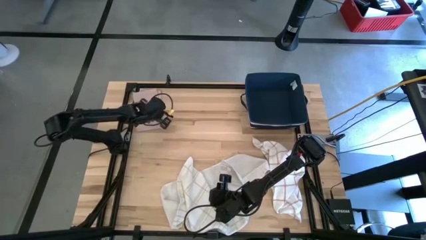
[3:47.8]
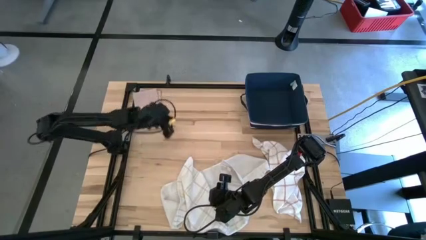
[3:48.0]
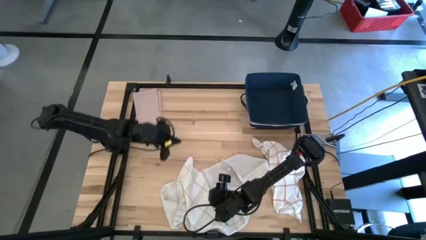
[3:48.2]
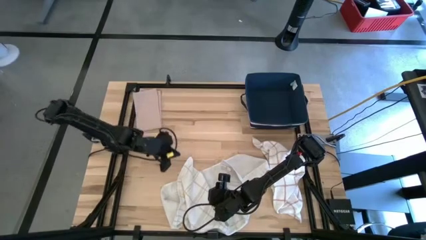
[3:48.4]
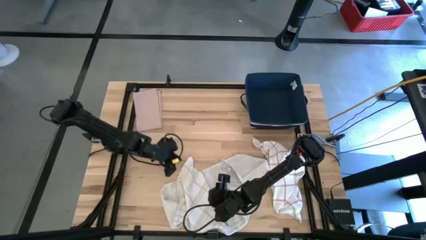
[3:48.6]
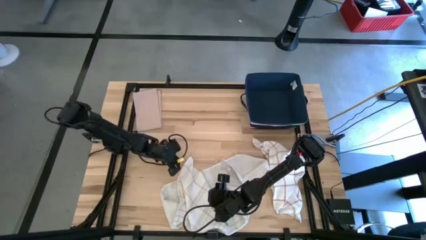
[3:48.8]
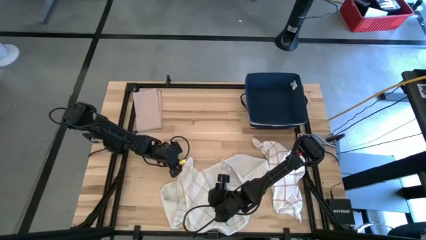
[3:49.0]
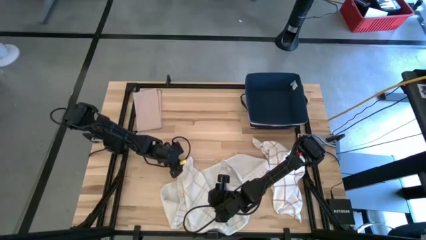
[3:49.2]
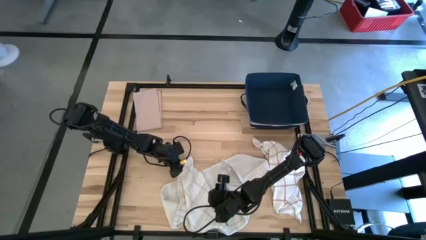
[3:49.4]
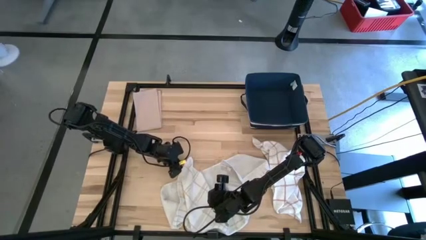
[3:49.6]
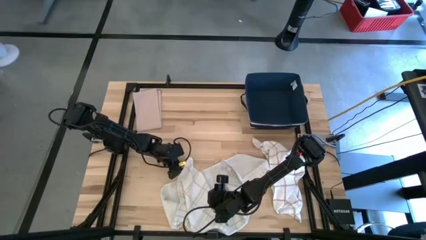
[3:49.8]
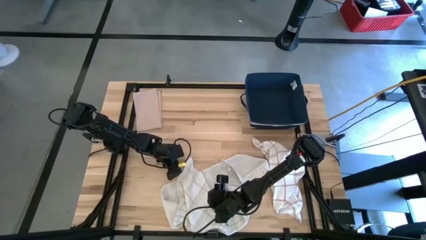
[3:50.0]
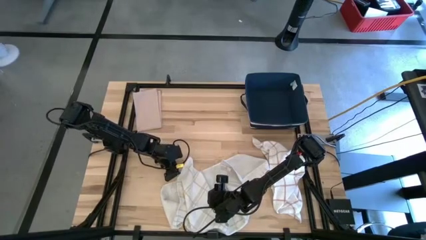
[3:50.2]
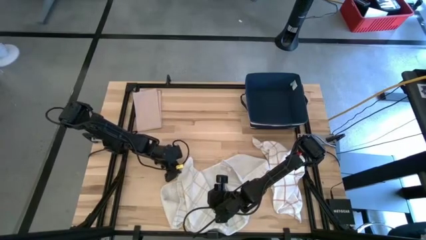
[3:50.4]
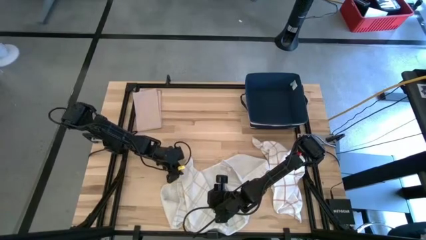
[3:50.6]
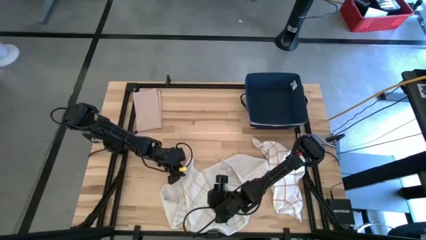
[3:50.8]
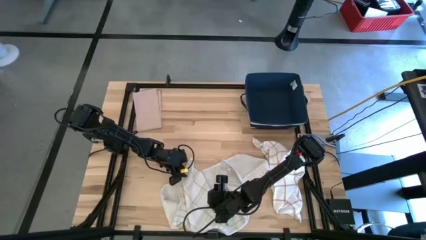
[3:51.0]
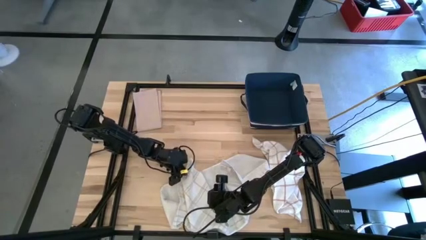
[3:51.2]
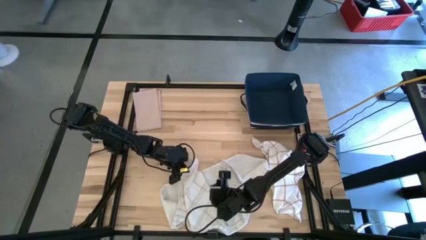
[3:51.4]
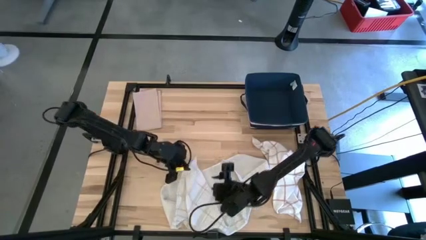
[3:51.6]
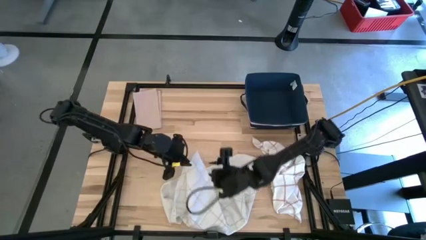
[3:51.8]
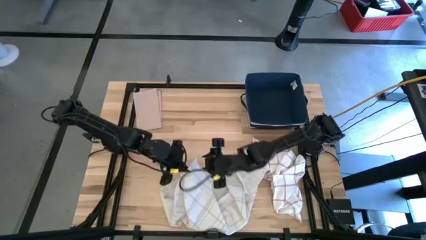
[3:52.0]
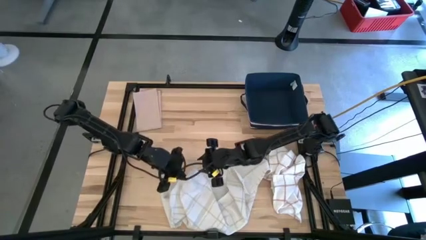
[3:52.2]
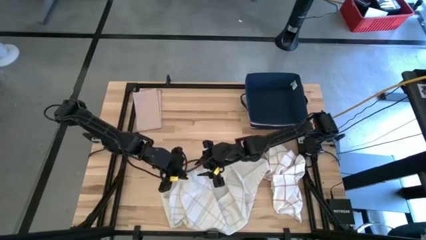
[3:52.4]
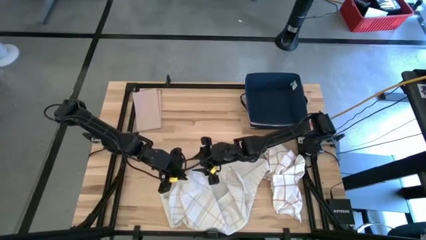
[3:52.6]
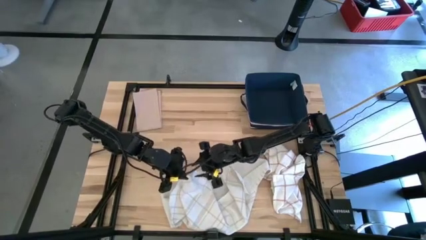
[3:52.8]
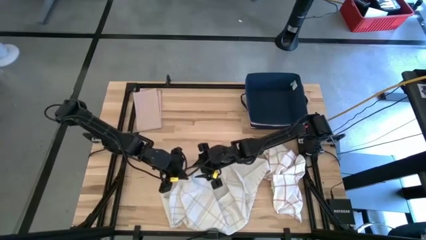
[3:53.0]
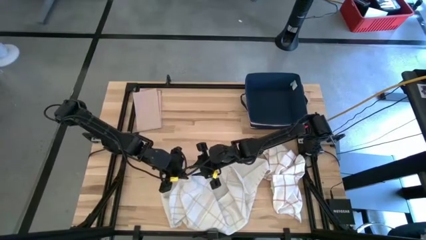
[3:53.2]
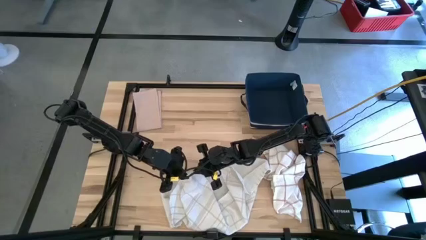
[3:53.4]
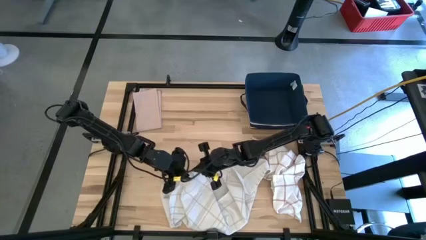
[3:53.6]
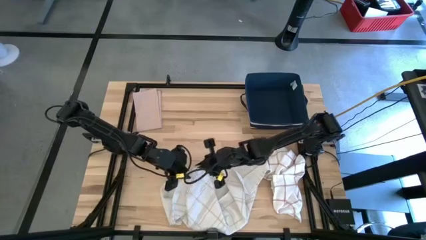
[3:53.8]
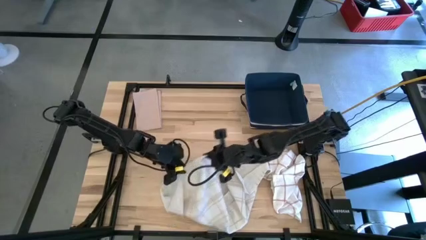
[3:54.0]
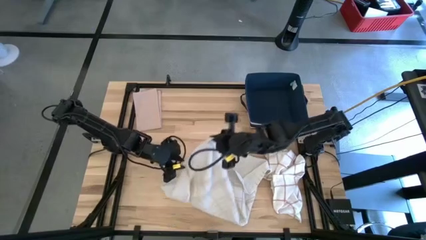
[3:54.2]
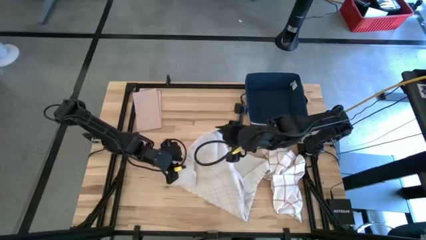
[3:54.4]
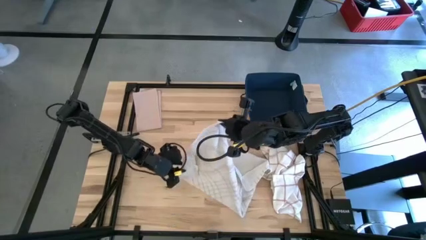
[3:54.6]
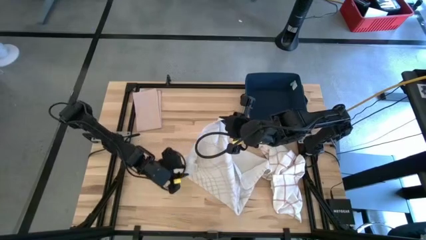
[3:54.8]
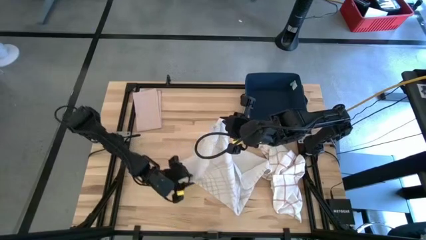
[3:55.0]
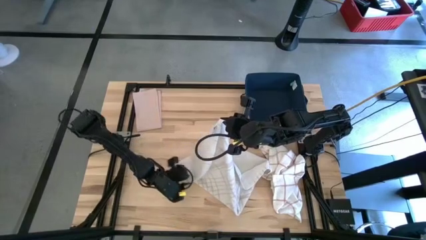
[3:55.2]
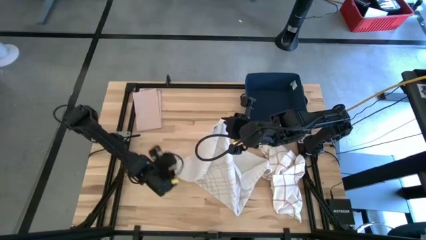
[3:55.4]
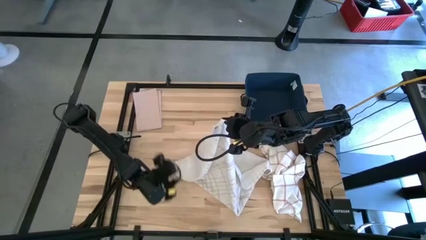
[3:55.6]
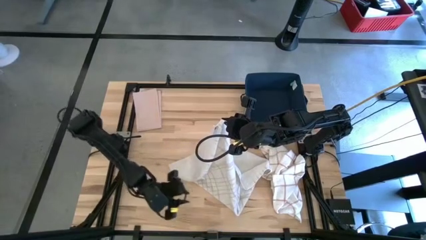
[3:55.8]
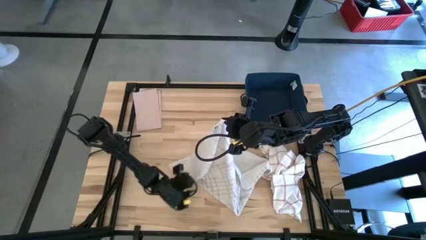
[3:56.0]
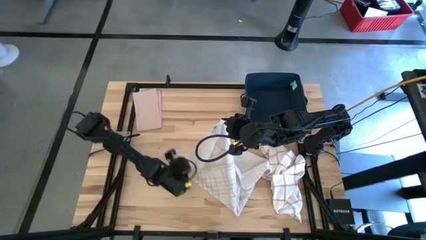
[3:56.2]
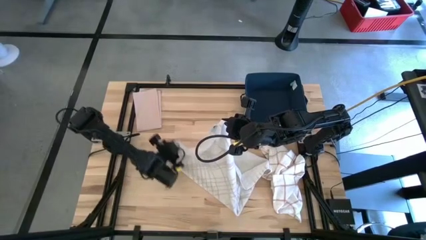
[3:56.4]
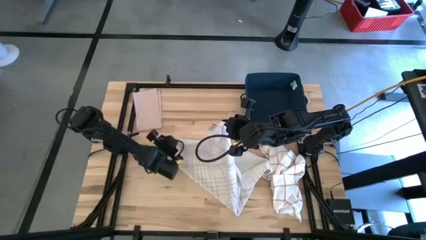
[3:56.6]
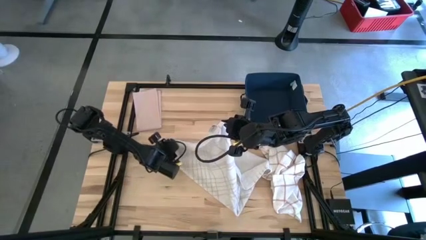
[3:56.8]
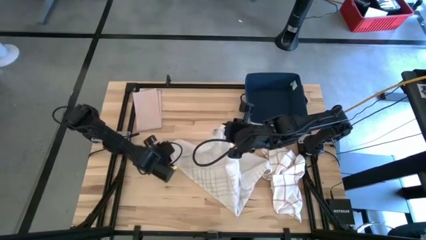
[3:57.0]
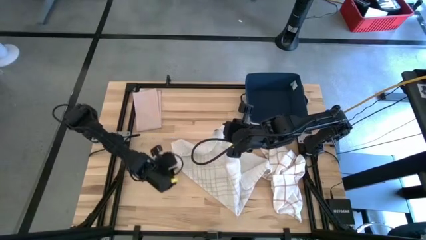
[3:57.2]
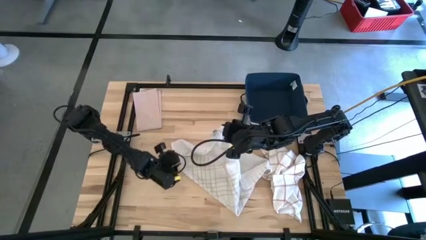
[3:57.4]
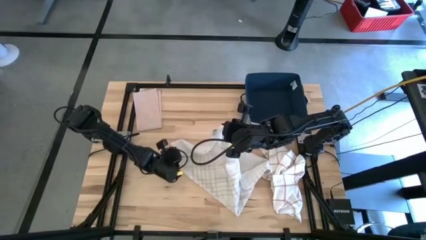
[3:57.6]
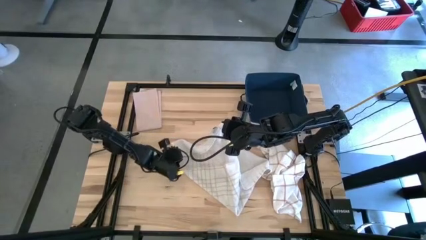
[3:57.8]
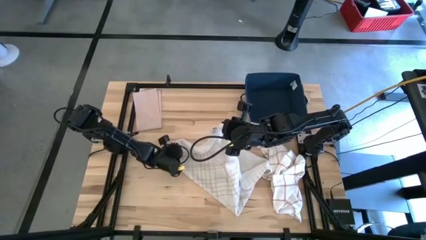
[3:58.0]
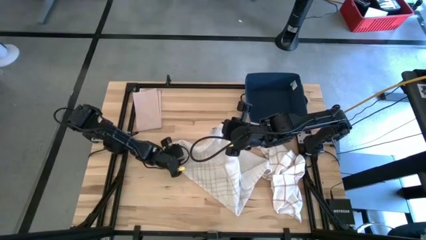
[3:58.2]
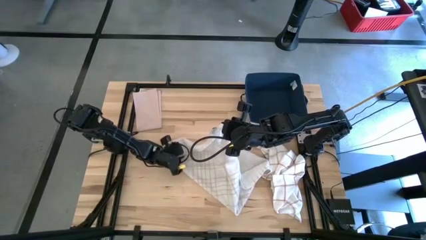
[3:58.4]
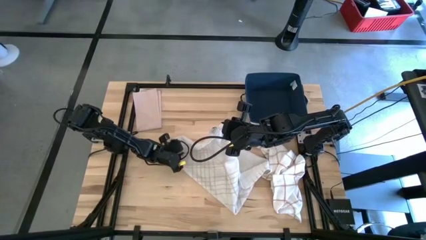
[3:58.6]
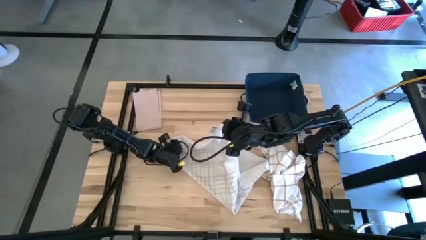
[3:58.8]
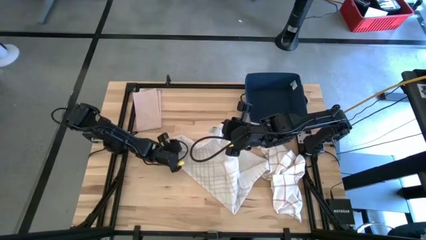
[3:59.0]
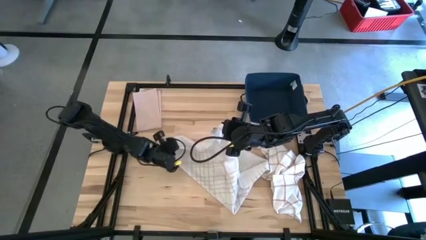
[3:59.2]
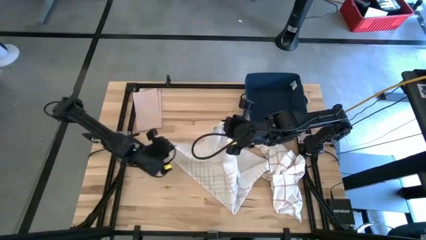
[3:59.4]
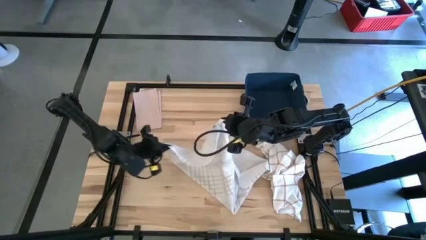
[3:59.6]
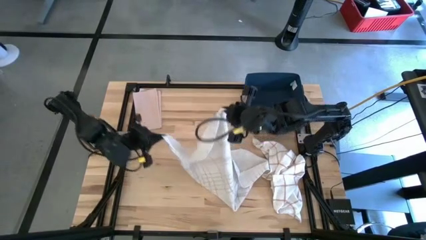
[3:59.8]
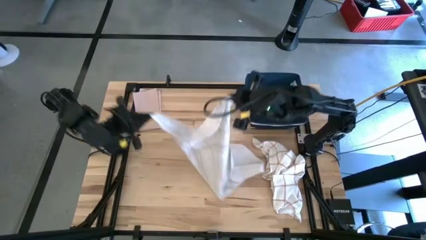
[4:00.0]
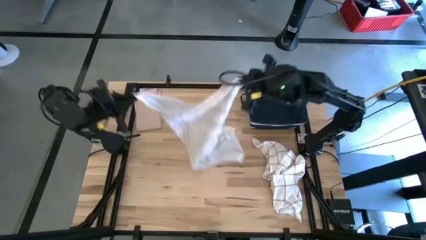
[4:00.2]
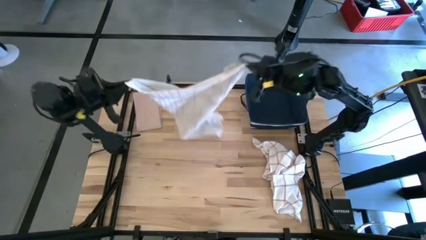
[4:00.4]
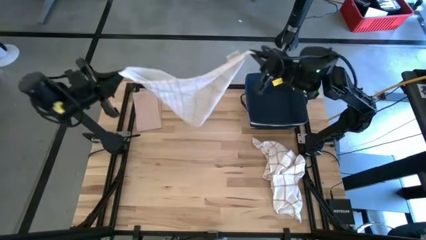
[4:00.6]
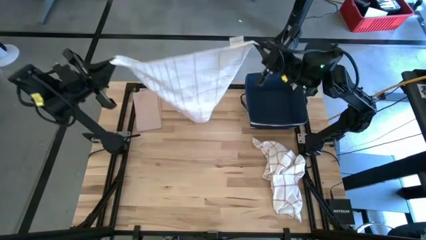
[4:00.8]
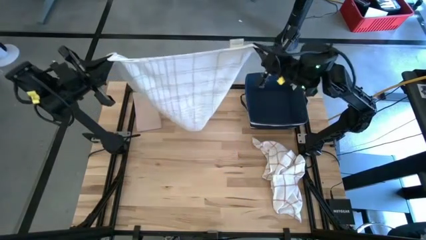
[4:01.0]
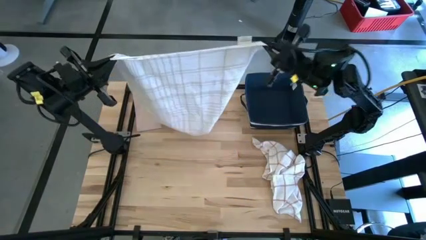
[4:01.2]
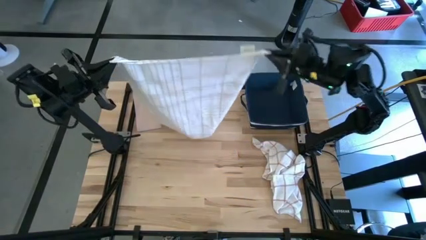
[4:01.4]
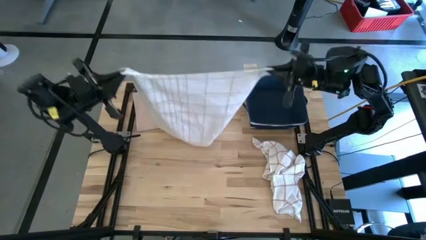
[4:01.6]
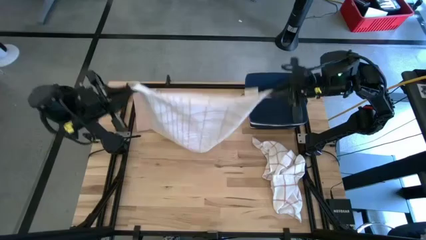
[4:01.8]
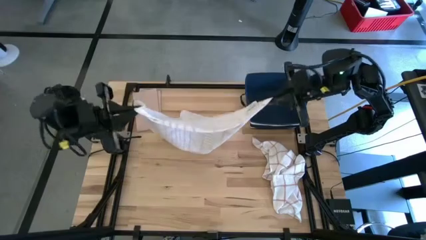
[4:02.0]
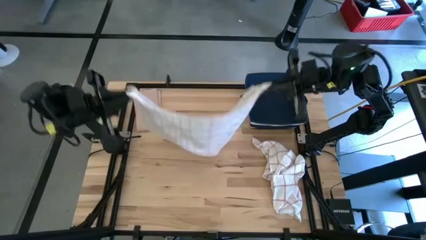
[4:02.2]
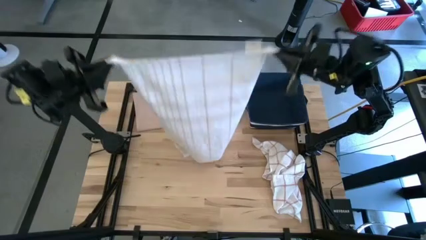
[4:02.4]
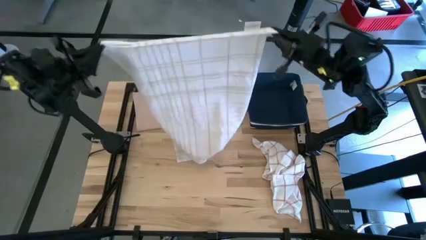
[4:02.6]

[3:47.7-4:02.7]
Task: Fold towel
Fold the white patterned towel

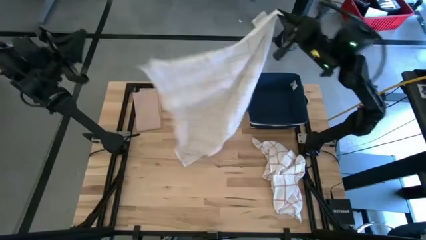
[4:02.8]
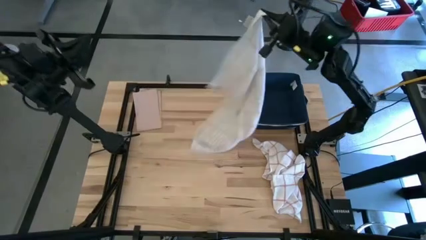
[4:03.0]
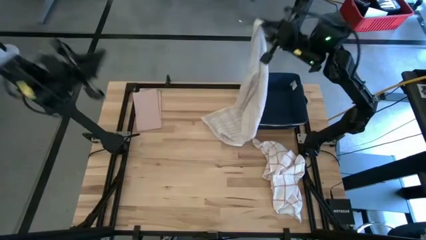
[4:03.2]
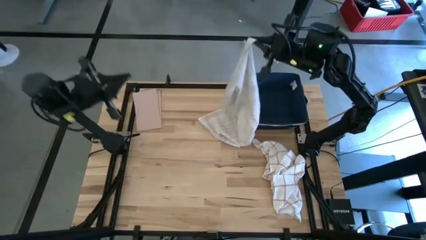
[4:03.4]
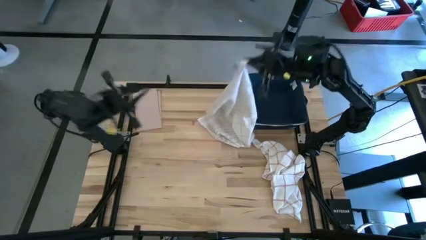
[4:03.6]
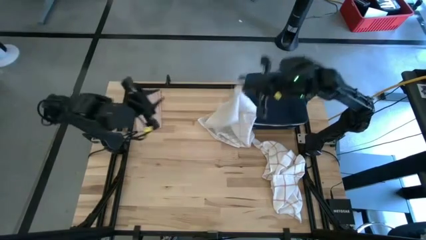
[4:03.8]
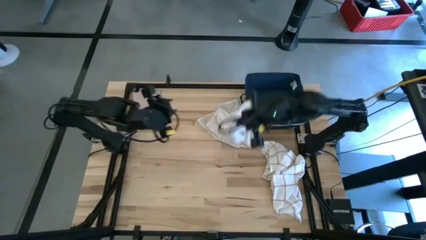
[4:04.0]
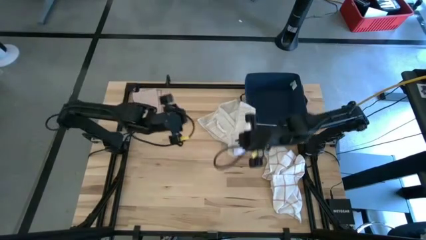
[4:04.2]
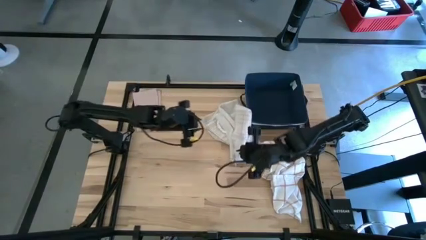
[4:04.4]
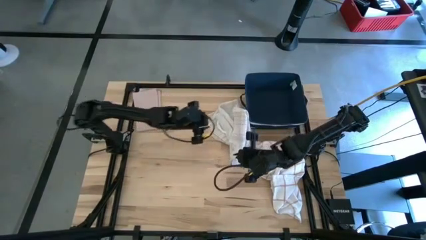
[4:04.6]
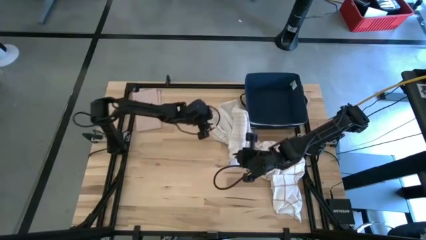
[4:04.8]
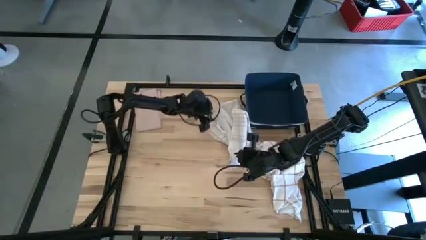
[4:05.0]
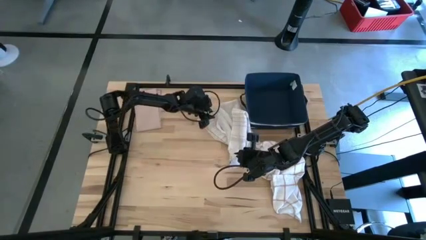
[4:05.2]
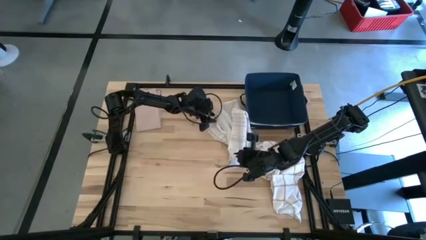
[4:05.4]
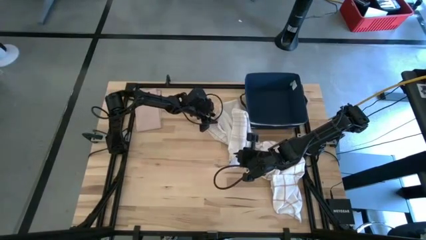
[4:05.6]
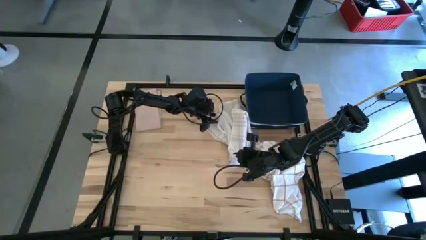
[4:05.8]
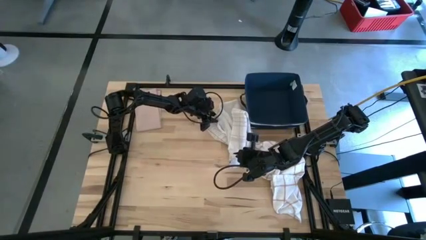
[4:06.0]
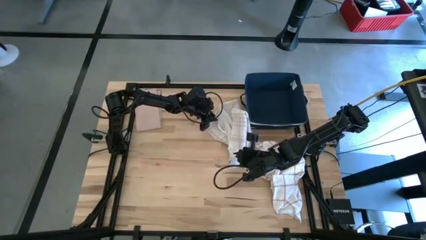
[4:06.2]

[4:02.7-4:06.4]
Fold the white patterned towel
